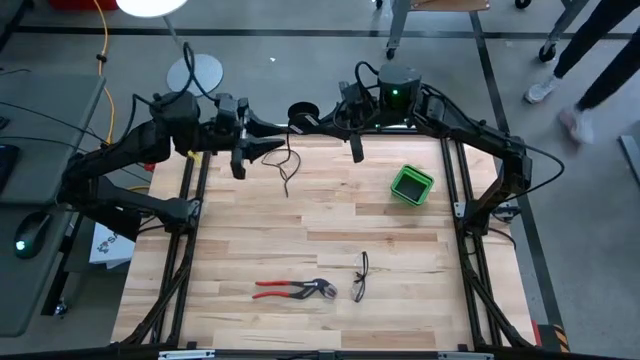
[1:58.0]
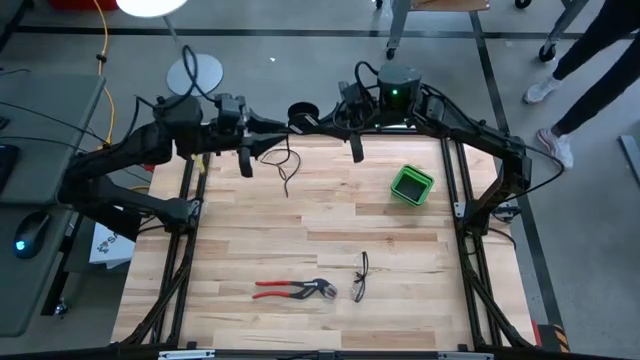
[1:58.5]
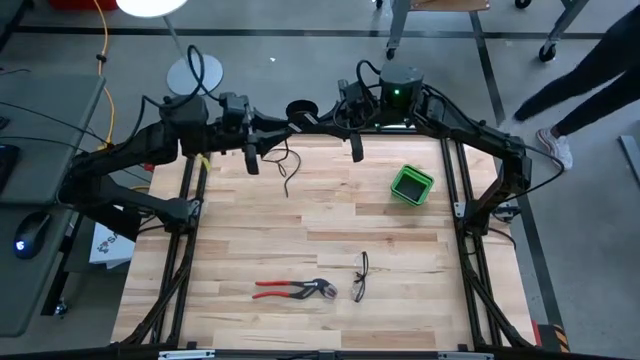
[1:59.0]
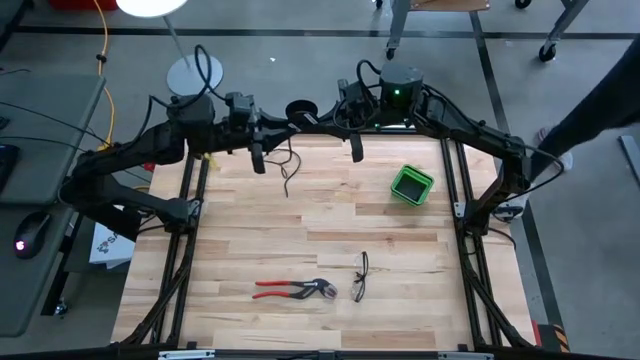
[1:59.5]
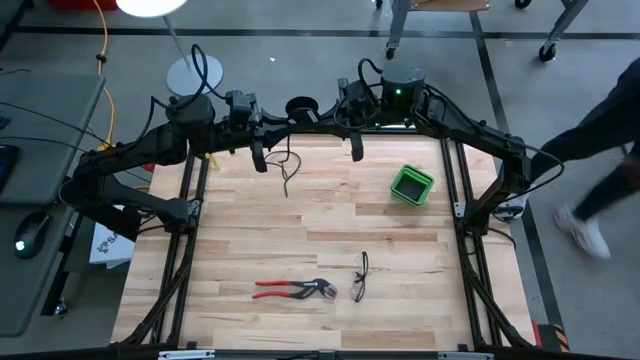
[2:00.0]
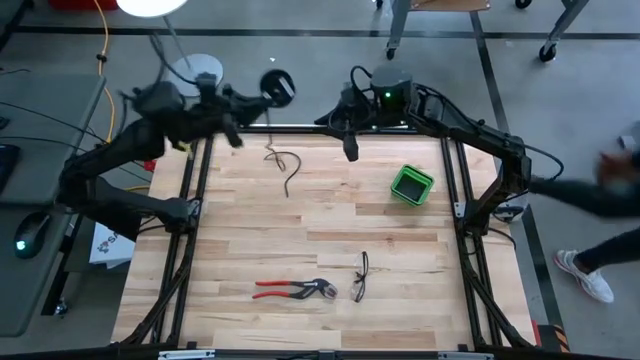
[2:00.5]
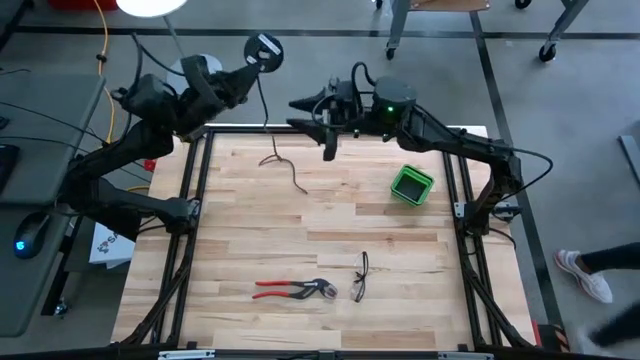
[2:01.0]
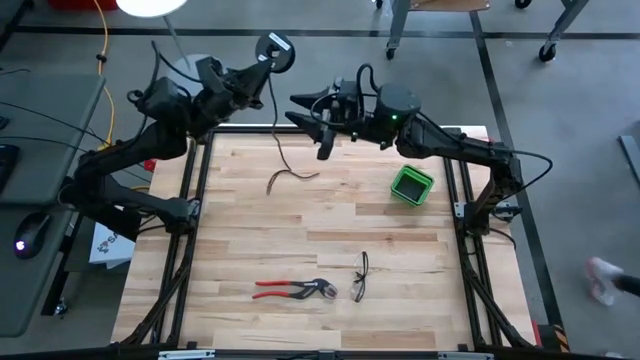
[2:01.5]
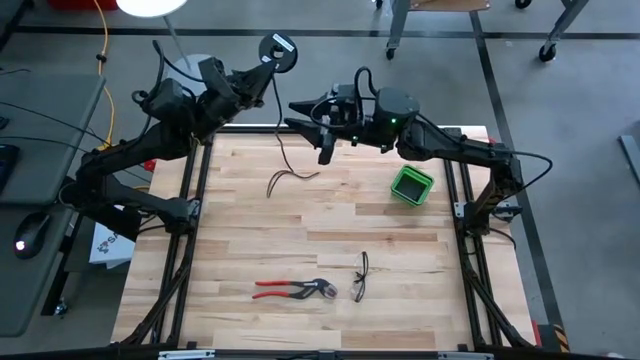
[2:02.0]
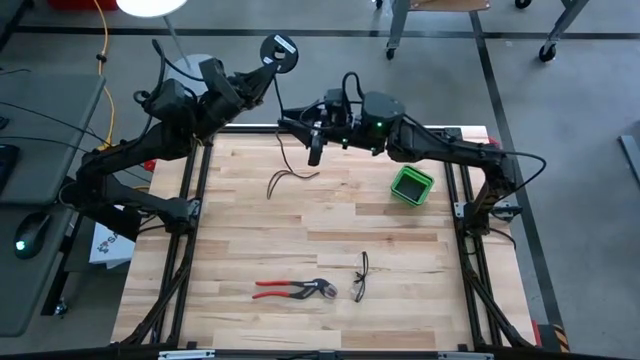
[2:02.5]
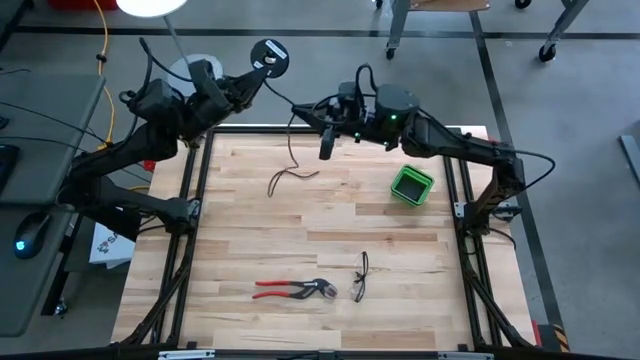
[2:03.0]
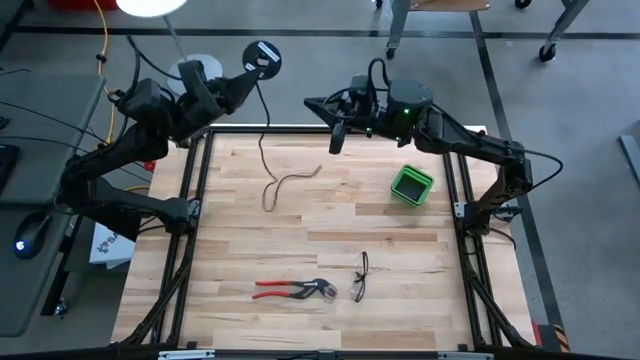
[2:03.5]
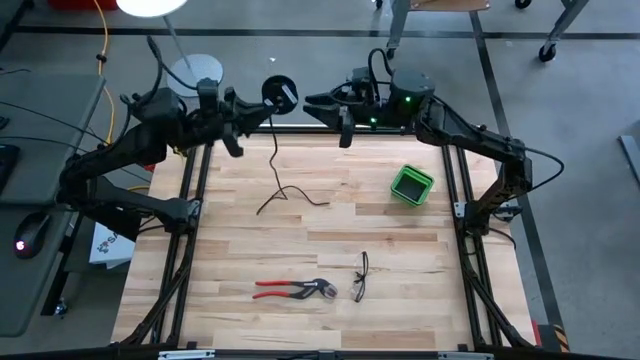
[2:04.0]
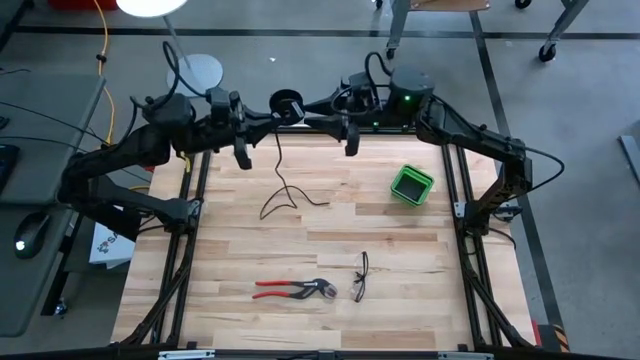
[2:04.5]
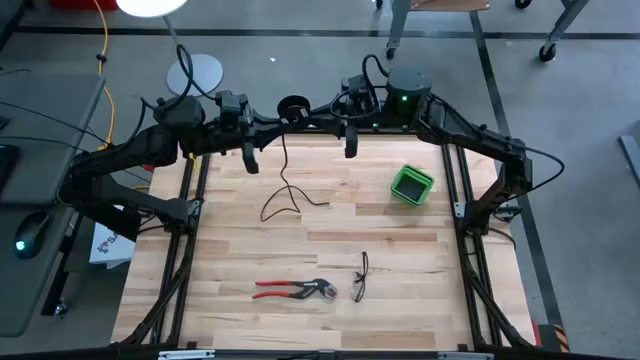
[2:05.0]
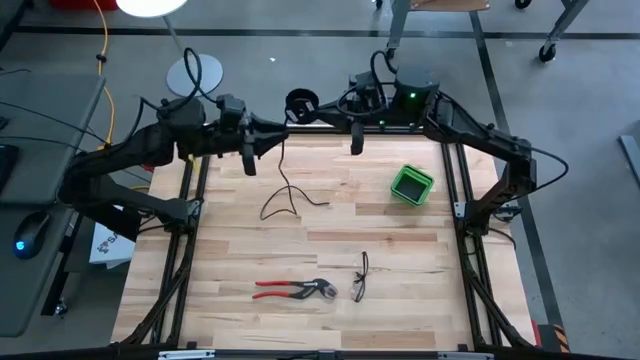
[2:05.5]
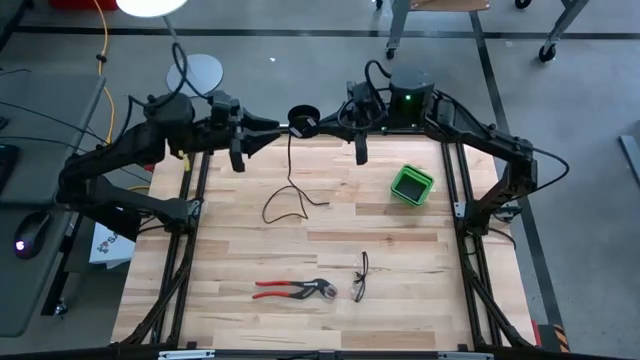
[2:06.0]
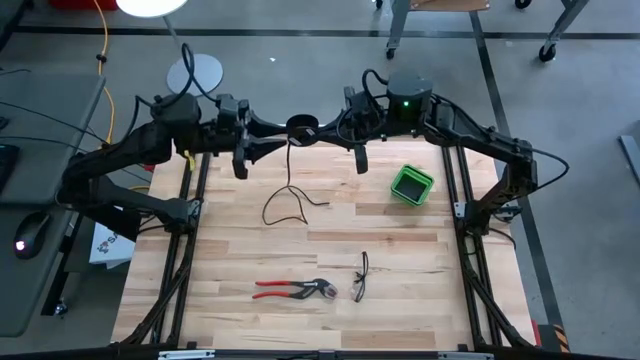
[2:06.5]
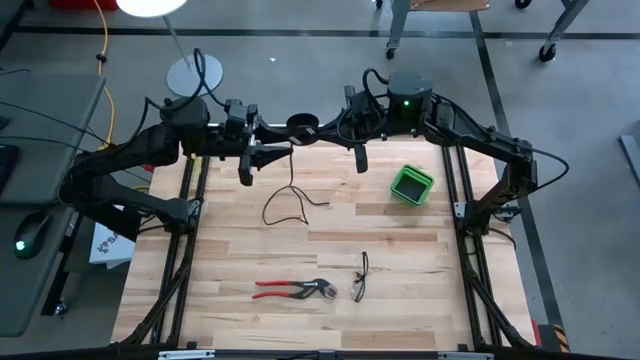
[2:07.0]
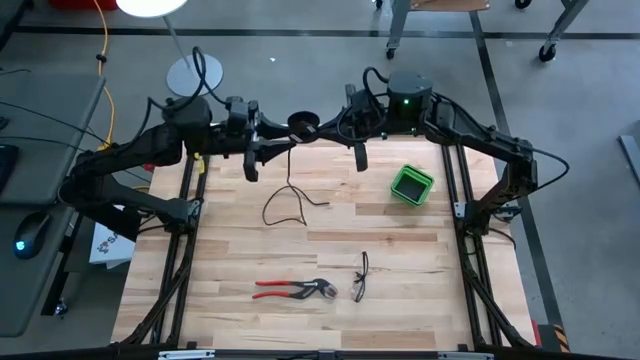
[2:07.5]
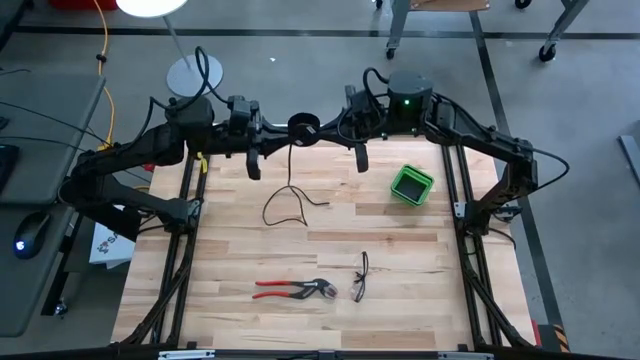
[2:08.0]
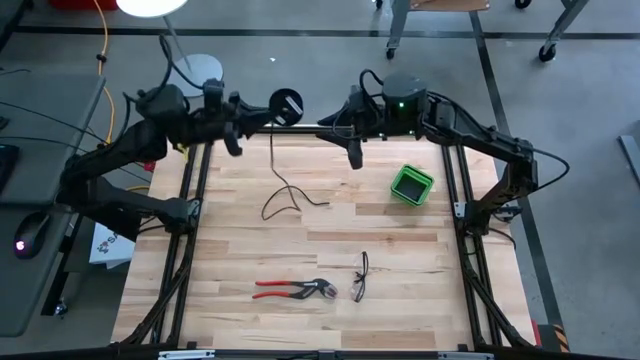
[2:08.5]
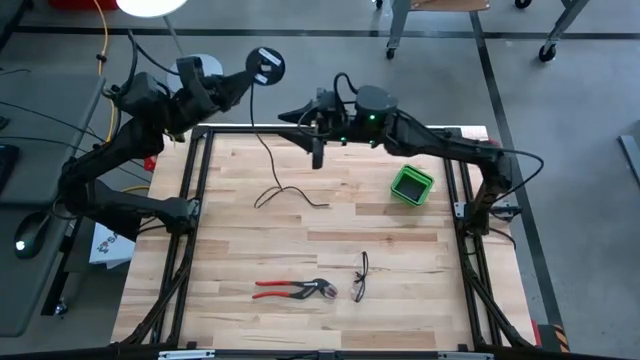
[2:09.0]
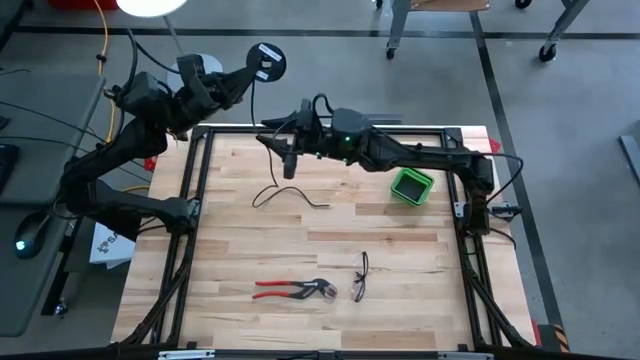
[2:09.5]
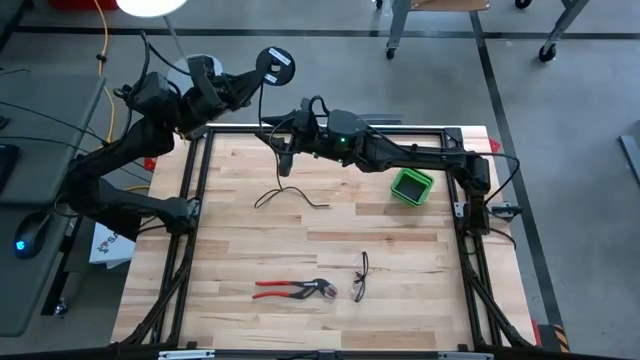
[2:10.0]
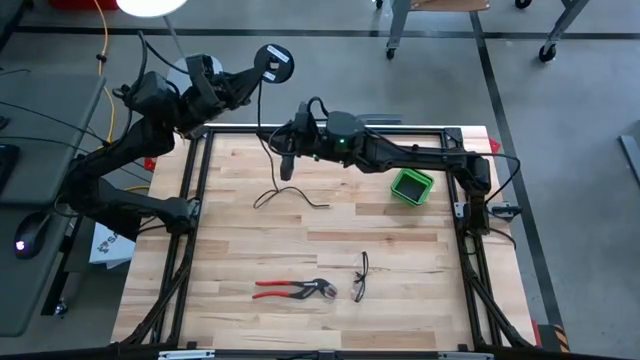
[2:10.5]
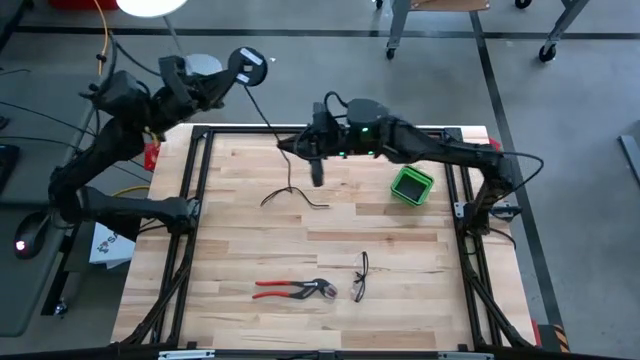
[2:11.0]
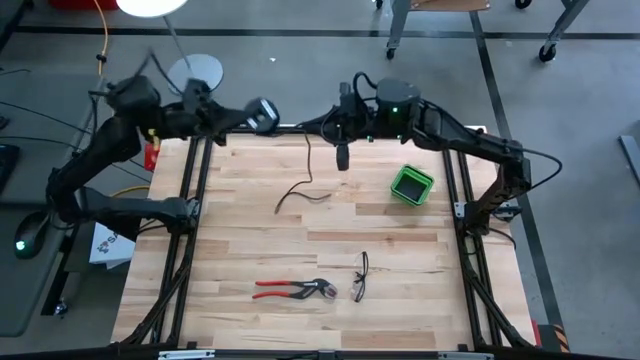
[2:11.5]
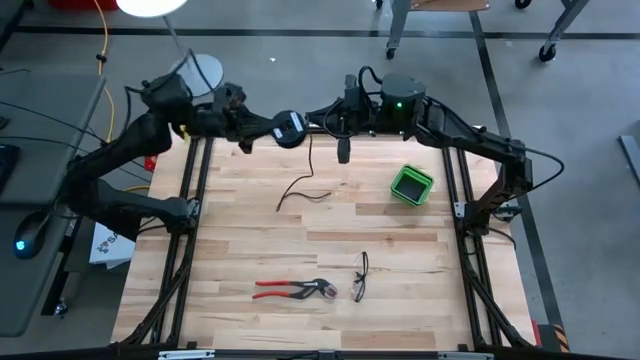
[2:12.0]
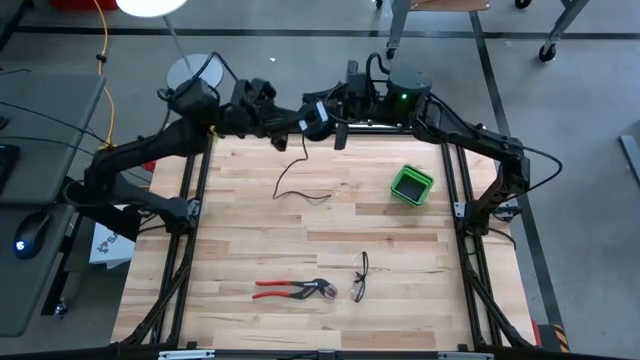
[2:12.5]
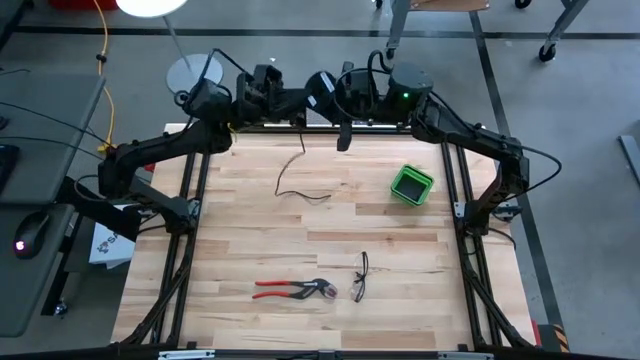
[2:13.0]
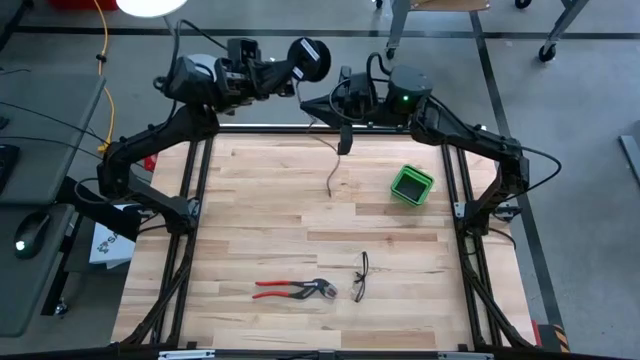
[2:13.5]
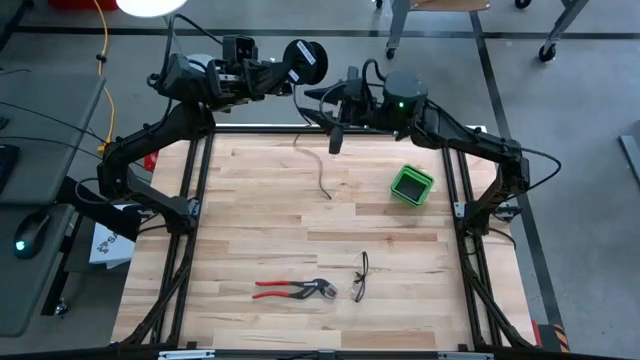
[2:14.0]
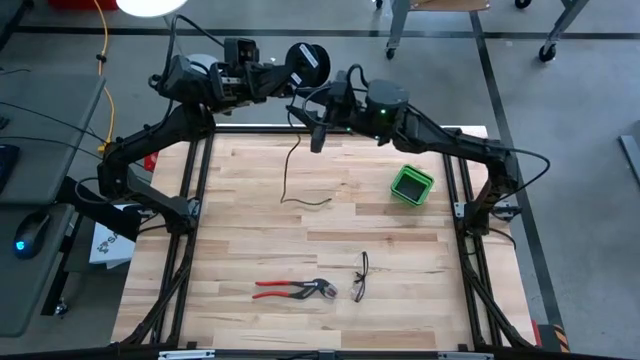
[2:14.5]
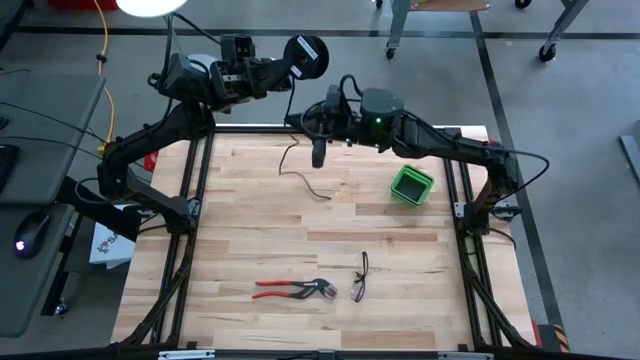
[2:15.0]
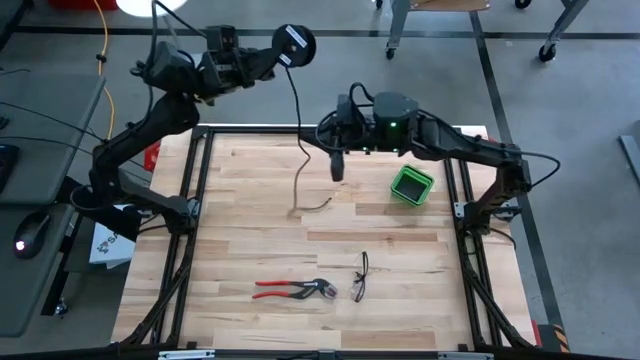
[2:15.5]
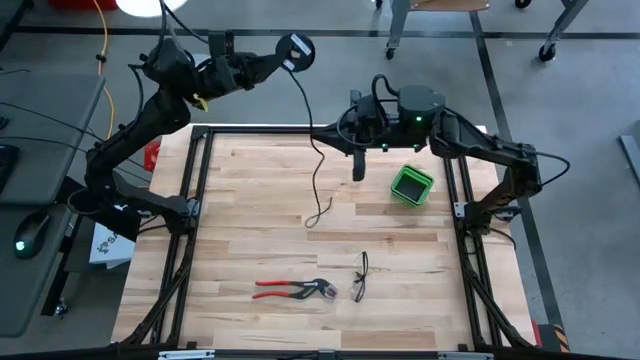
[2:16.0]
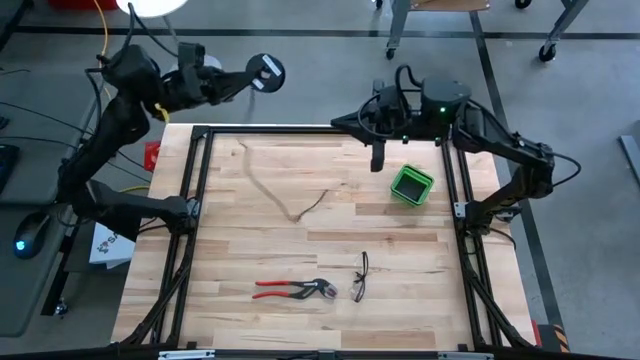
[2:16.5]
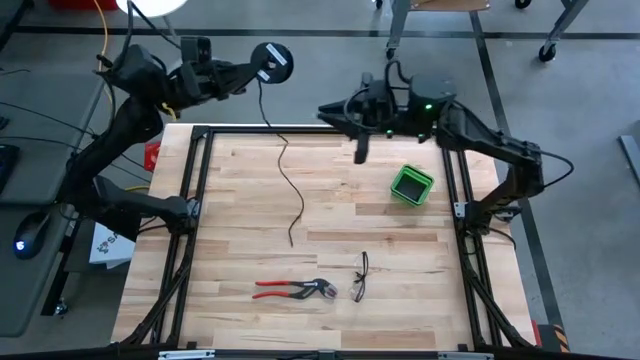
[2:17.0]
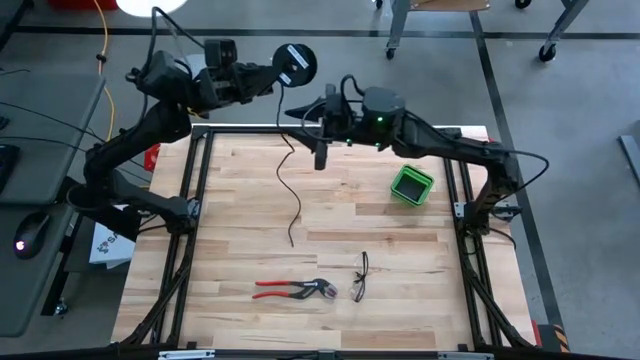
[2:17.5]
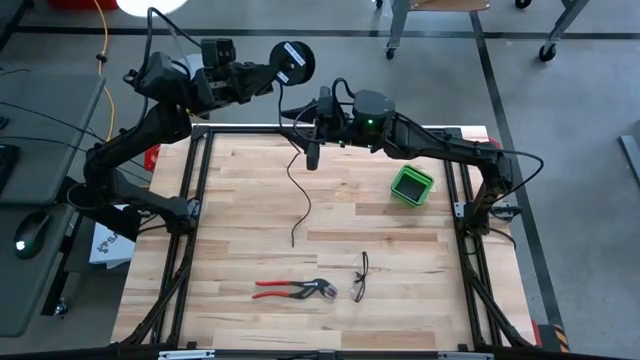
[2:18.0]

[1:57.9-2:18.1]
Task: Coil cords
Coil the black wire onto the black spool
